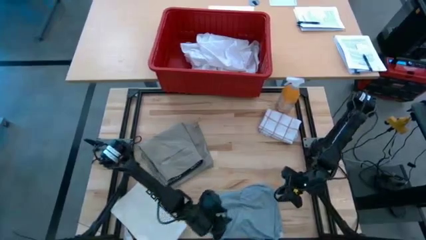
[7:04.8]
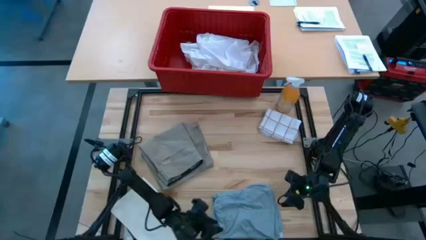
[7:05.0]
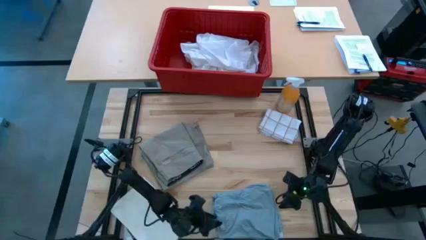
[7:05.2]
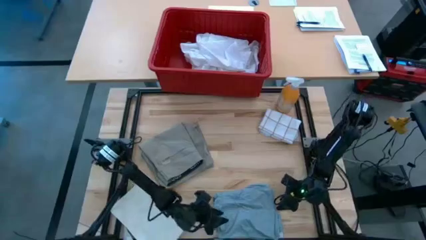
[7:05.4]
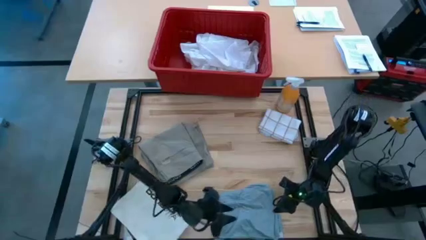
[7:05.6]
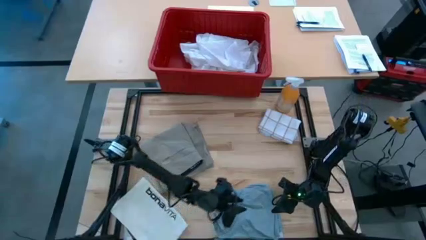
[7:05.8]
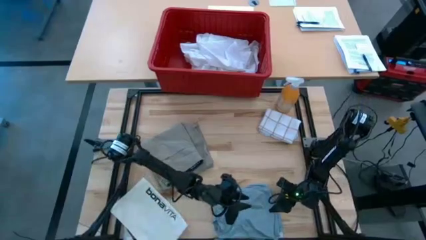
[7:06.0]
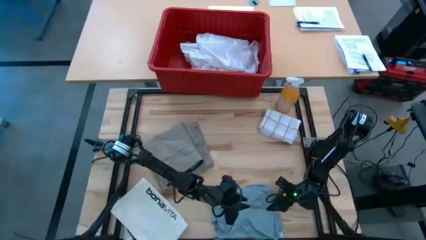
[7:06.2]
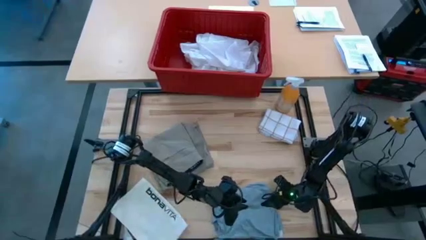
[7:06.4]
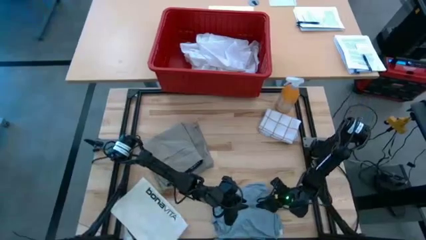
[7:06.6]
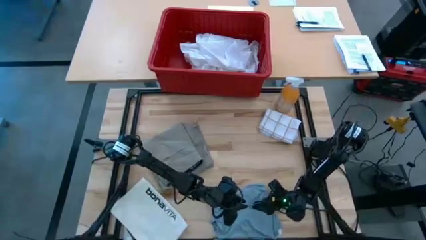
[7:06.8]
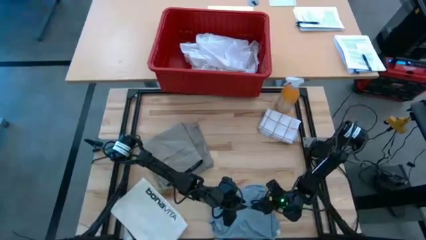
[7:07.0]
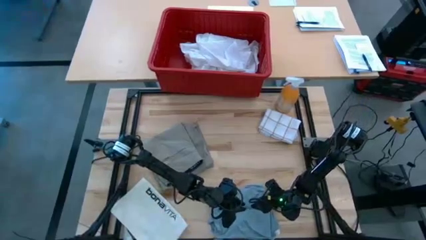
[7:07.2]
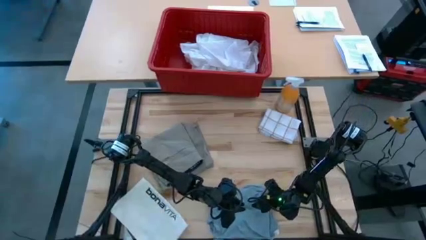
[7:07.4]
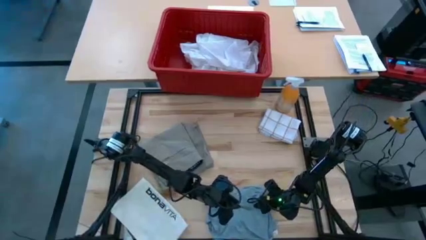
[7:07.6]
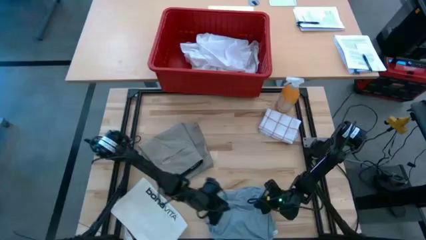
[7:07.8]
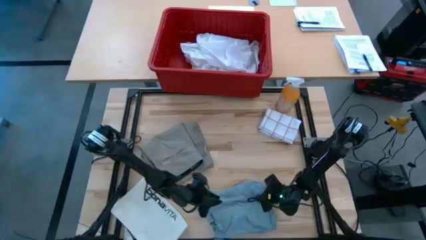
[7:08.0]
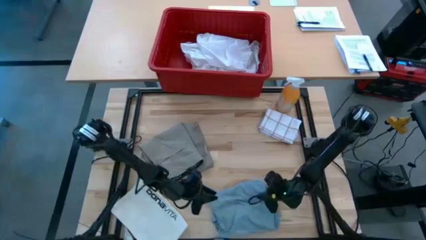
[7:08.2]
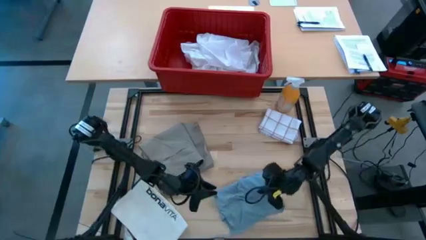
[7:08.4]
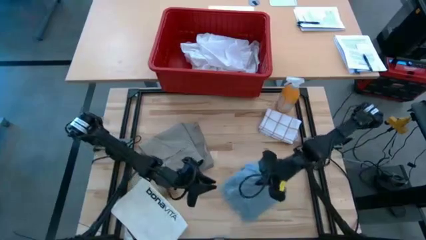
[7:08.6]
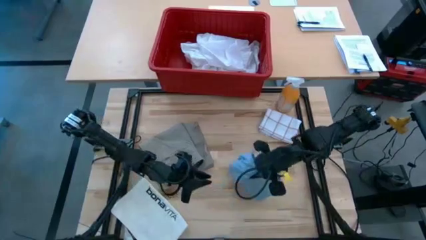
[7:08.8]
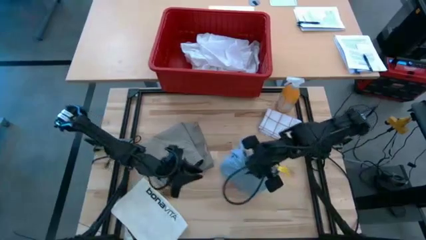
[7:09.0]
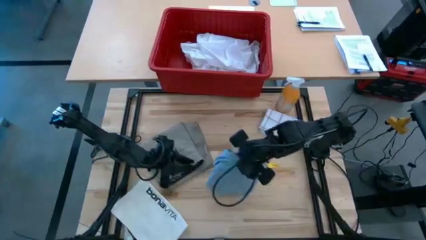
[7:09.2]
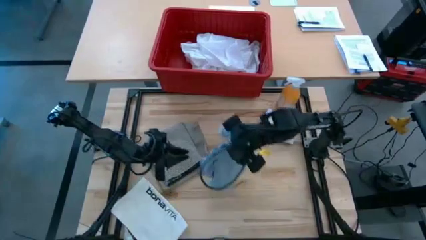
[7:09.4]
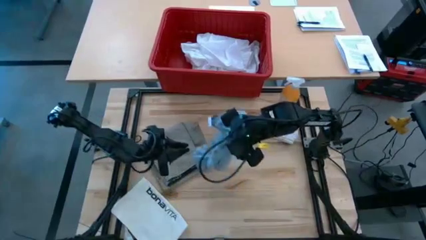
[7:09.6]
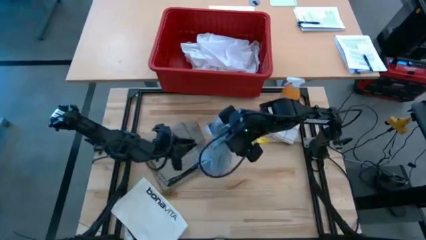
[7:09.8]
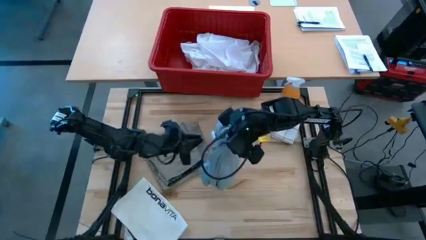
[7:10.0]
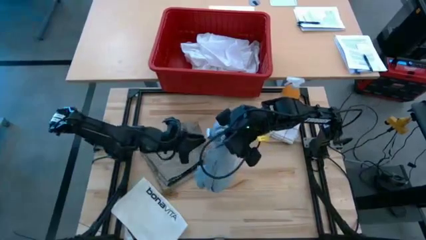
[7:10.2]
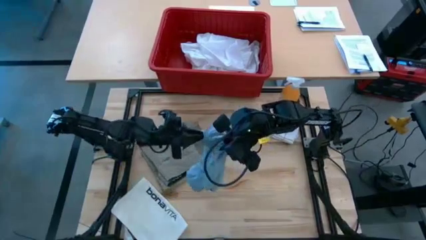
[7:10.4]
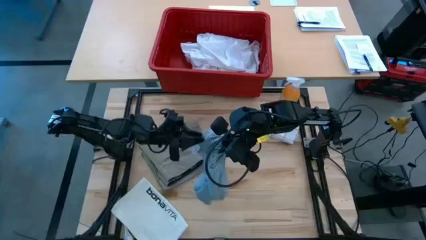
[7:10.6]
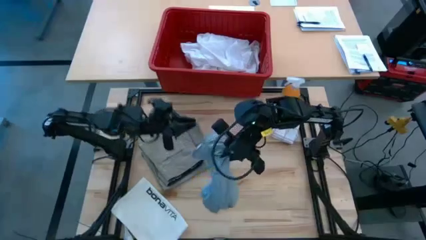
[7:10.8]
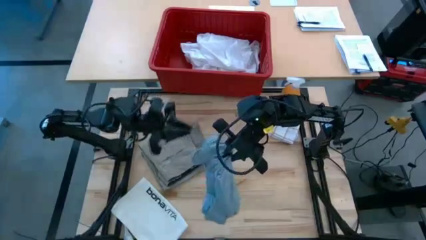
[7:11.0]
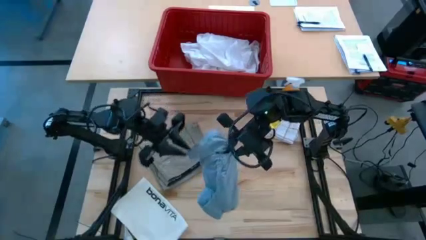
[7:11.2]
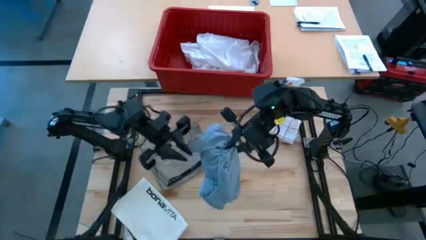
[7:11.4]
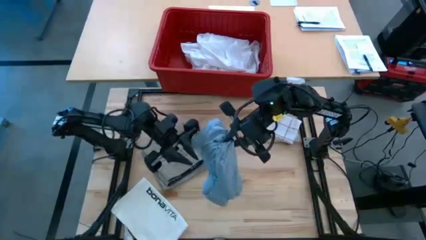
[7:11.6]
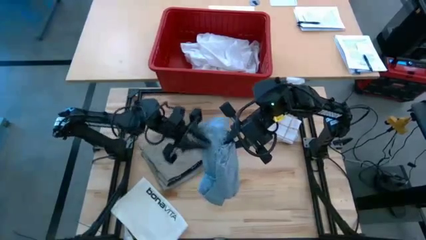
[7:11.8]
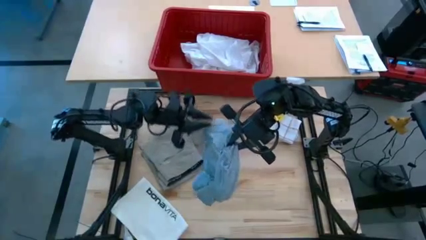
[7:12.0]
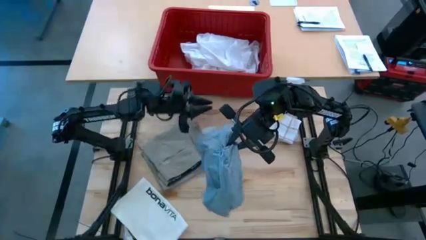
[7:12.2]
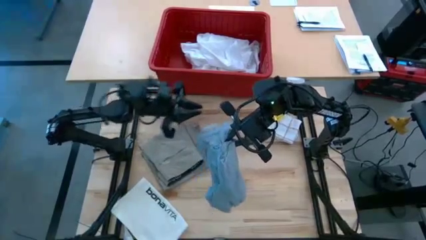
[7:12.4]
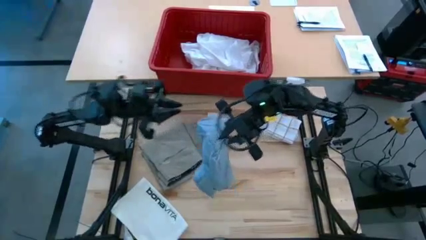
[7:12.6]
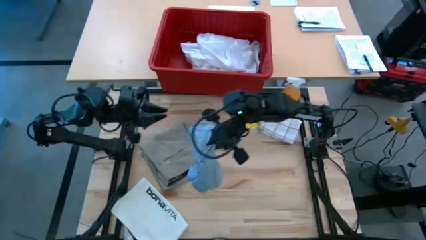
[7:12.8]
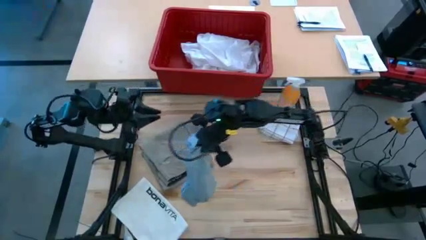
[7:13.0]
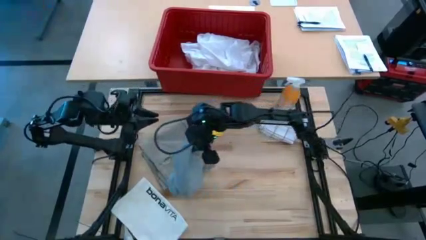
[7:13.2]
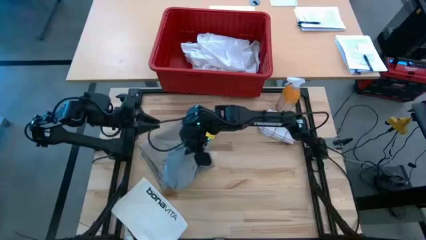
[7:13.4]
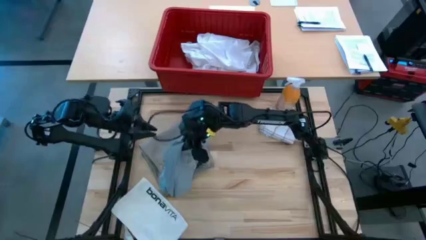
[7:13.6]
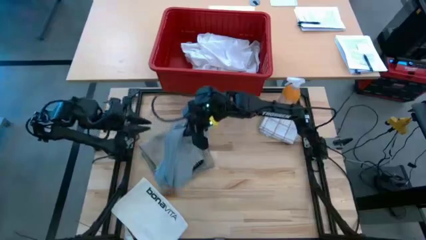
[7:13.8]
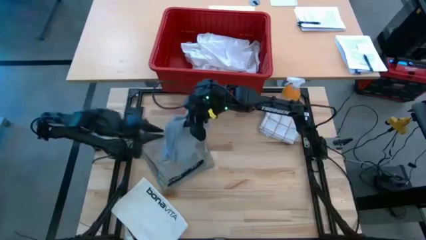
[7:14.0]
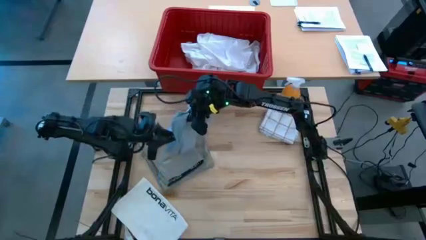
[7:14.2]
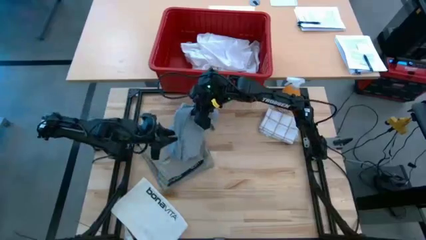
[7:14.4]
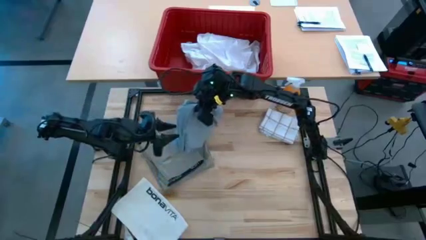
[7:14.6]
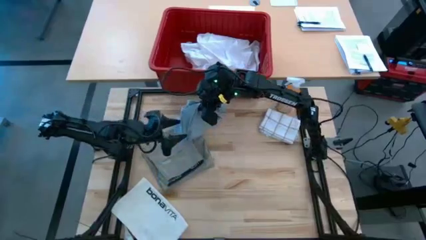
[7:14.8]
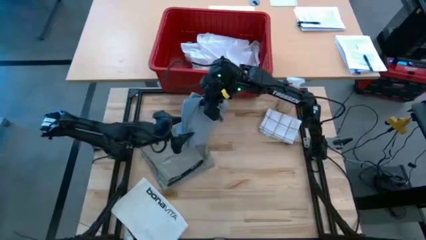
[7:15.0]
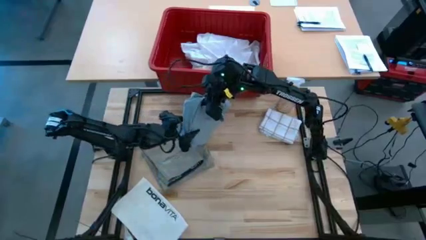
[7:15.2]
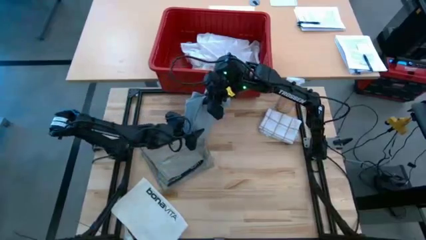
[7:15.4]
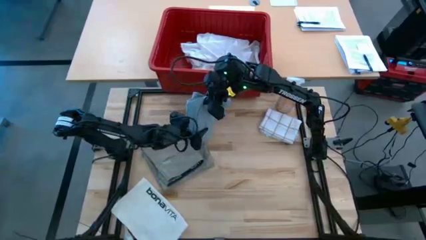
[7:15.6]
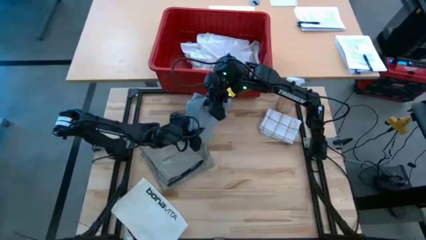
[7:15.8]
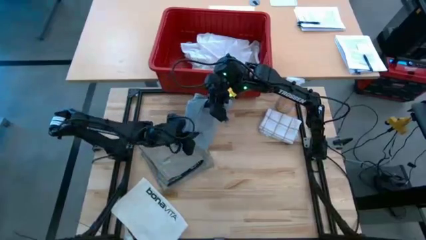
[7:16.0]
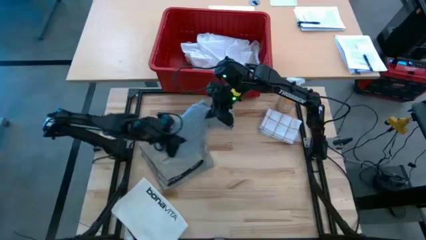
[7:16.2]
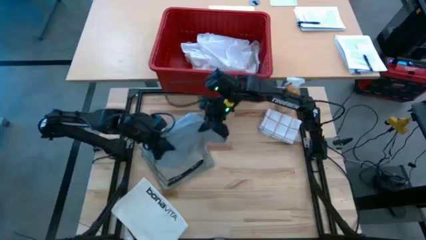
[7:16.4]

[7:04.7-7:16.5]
Task: Fold laundry
Stack the folded gray shirt on top of the folded gray shorts

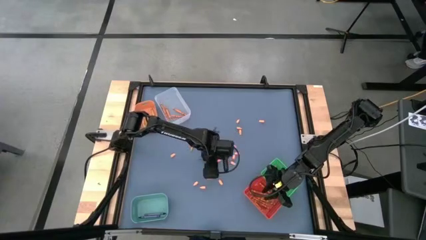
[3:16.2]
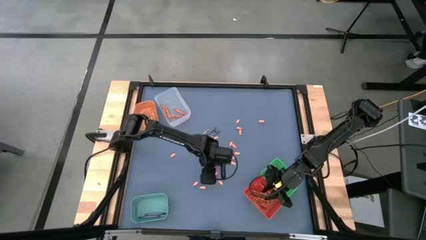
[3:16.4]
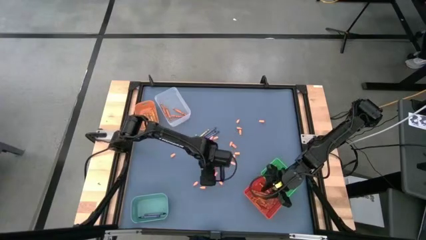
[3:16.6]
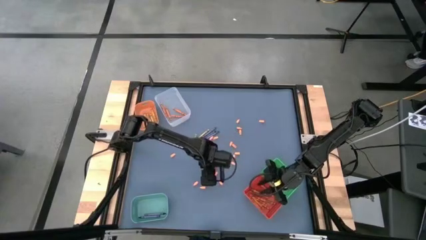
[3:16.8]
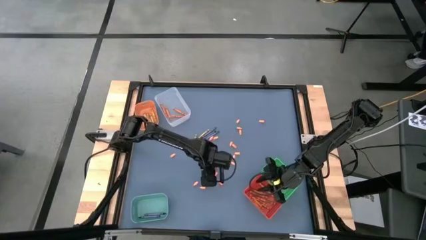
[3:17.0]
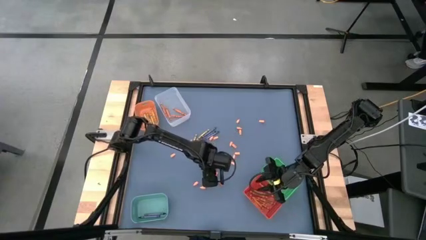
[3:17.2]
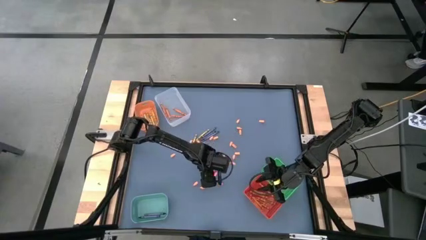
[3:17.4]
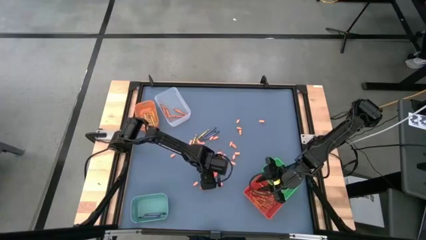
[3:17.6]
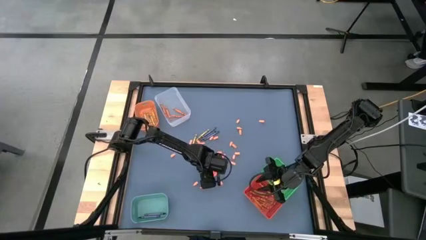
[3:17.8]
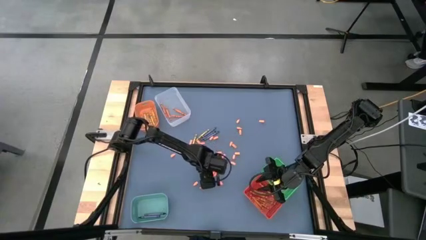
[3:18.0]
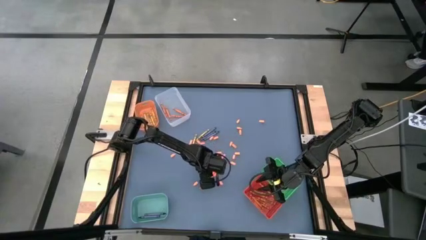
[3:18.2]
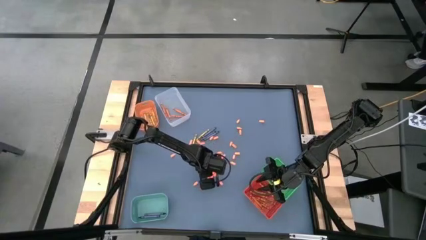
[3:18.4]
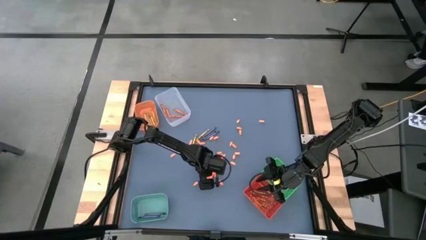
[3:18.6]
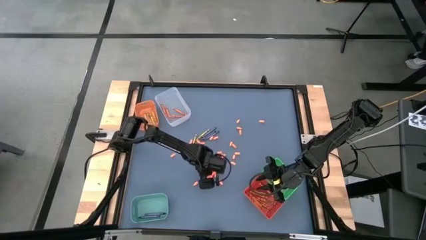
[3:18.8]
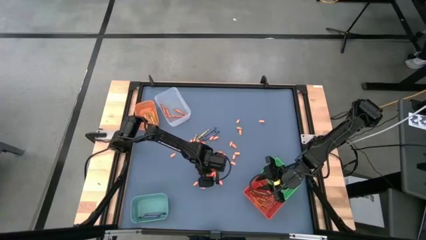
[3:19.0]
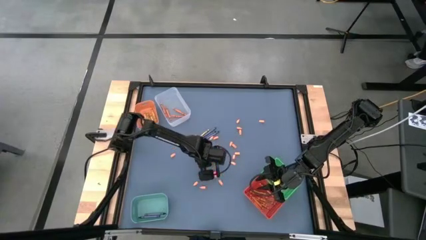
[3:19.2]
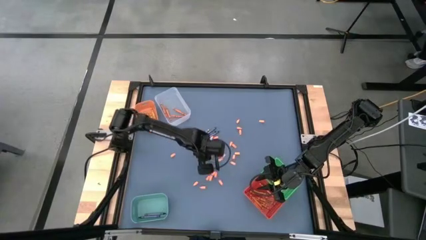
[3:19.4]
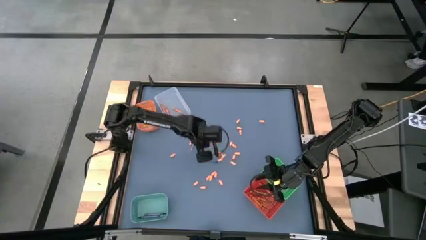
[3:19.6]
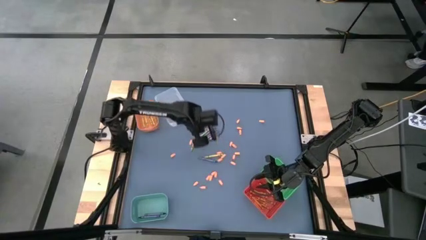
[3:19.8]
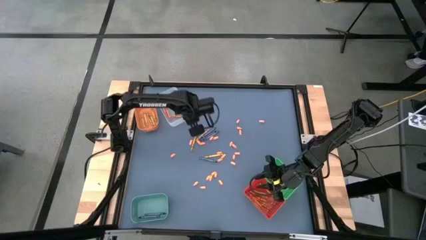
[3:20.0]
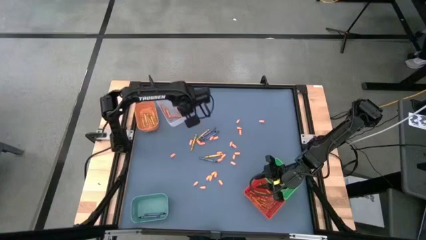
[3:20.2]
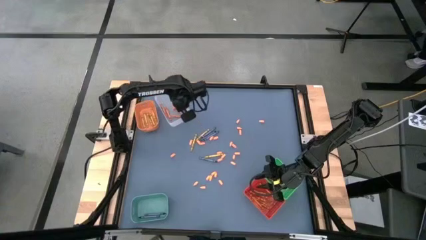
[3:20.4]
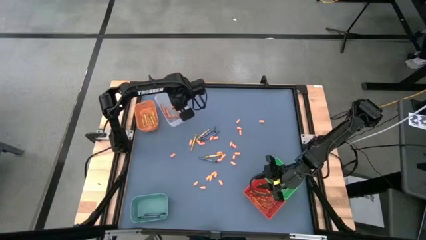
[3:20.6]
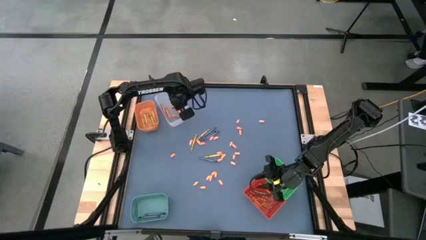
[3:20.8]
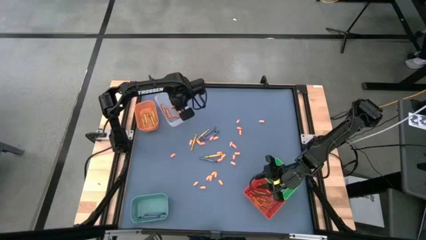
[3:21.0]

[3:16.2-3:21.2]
Task: Sort crayons
Put the orange crayon into the transparent bin
